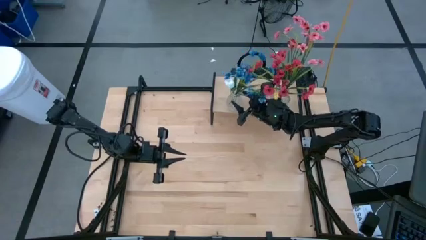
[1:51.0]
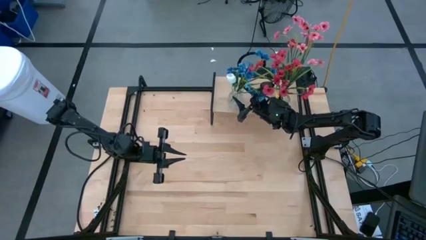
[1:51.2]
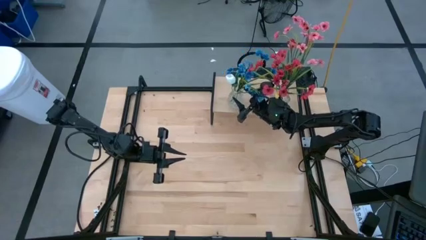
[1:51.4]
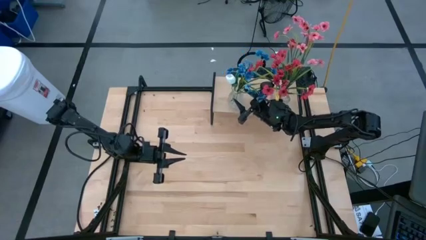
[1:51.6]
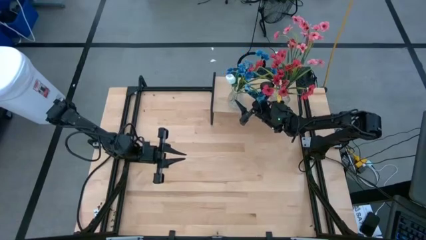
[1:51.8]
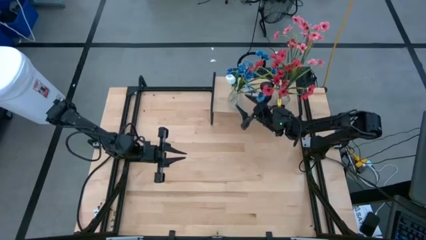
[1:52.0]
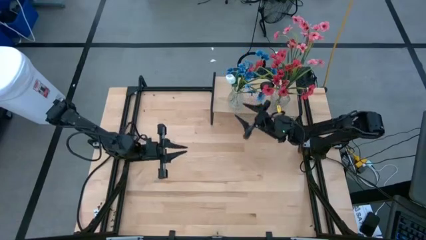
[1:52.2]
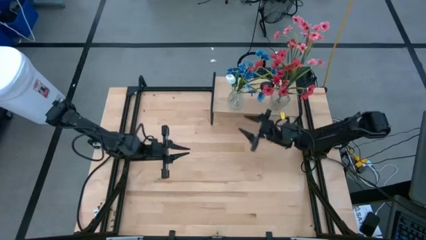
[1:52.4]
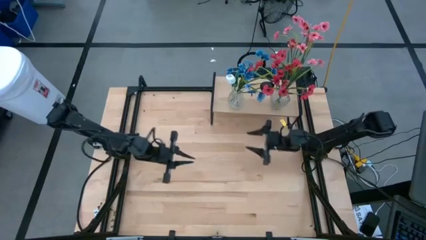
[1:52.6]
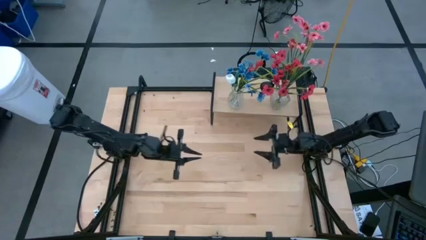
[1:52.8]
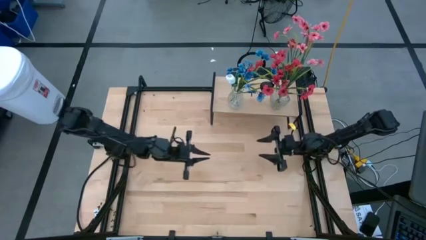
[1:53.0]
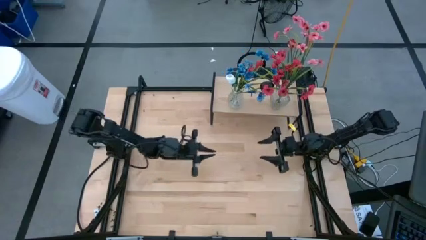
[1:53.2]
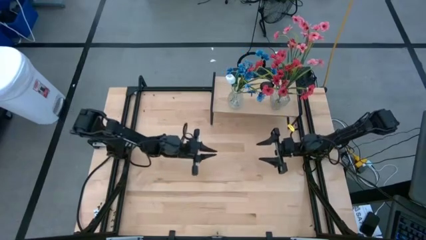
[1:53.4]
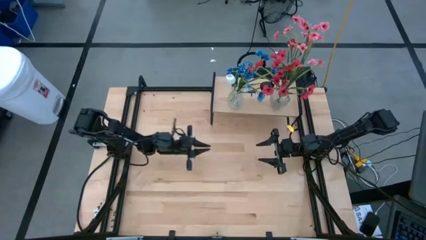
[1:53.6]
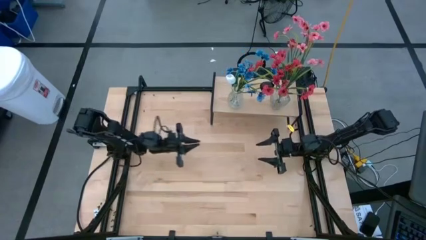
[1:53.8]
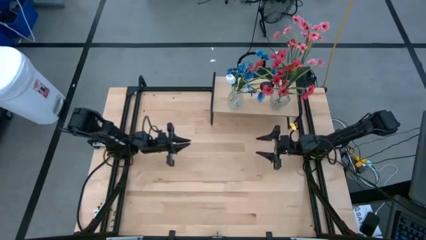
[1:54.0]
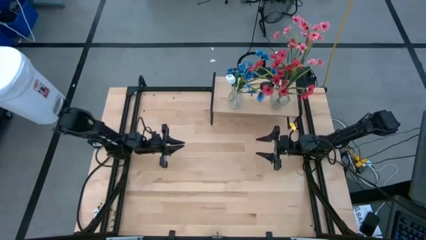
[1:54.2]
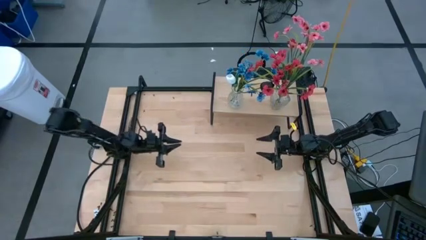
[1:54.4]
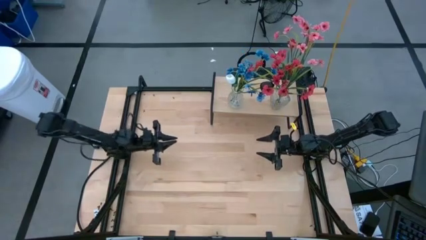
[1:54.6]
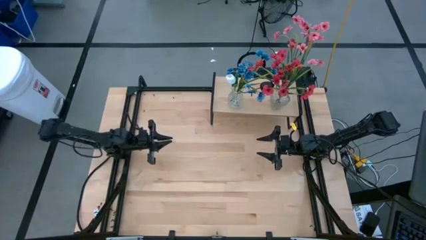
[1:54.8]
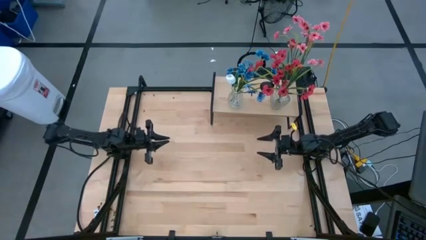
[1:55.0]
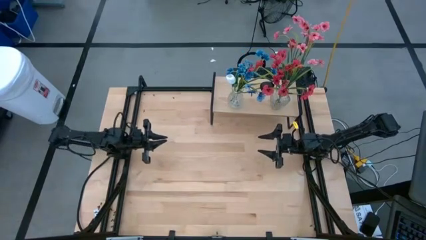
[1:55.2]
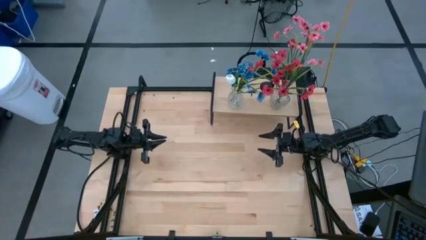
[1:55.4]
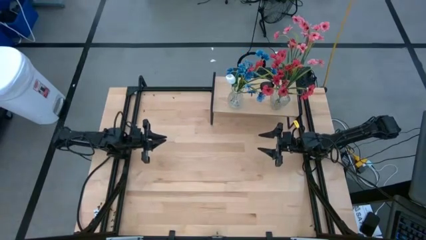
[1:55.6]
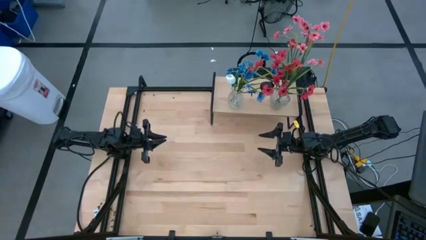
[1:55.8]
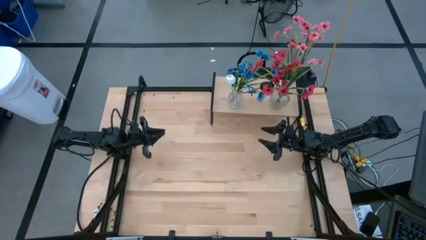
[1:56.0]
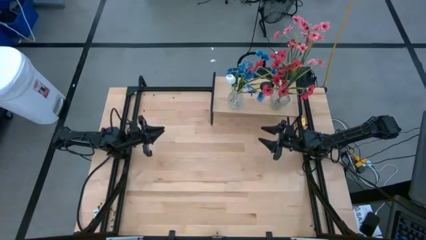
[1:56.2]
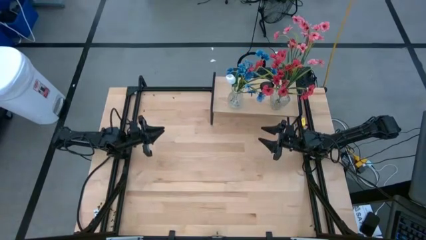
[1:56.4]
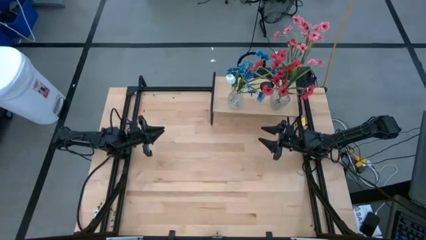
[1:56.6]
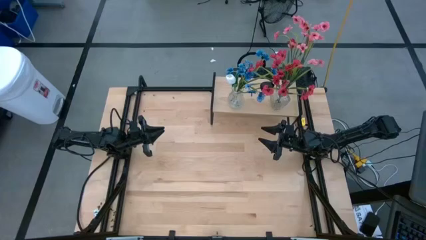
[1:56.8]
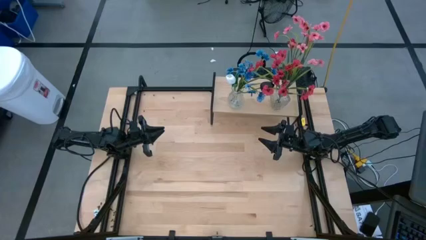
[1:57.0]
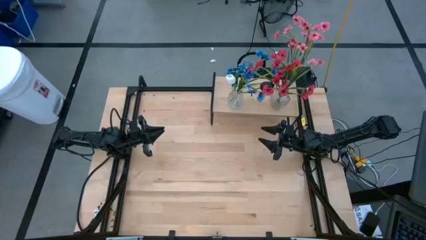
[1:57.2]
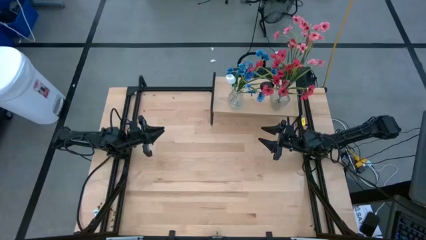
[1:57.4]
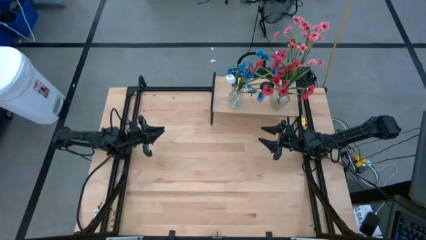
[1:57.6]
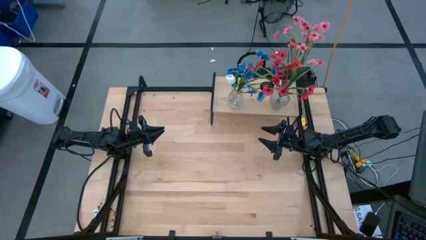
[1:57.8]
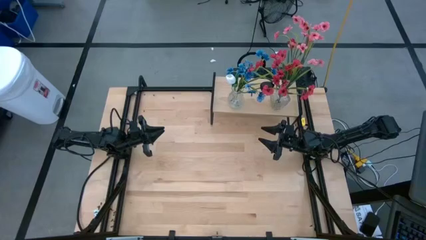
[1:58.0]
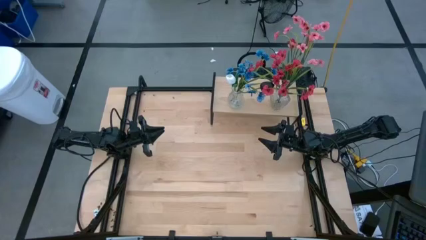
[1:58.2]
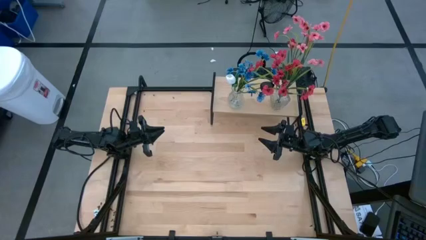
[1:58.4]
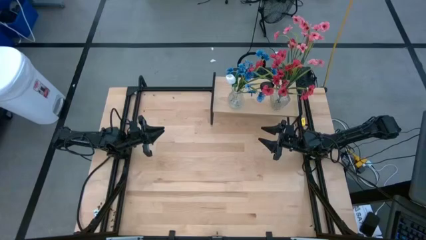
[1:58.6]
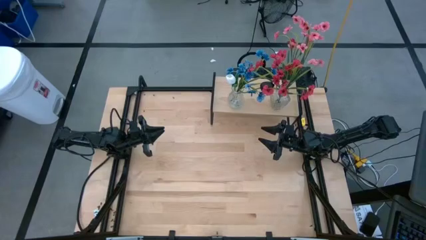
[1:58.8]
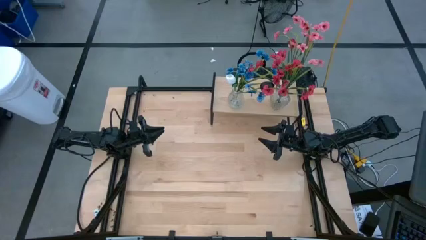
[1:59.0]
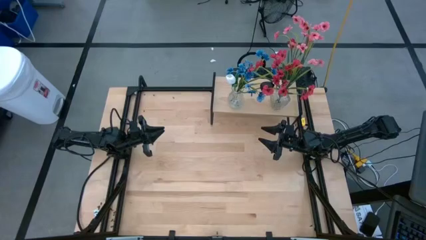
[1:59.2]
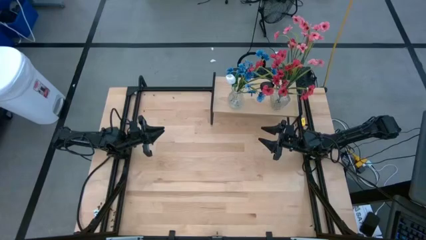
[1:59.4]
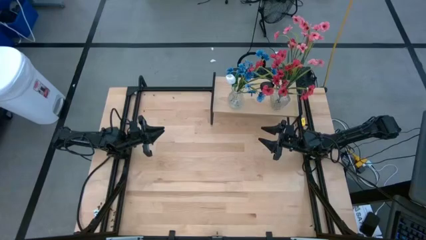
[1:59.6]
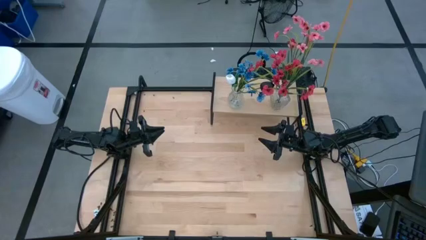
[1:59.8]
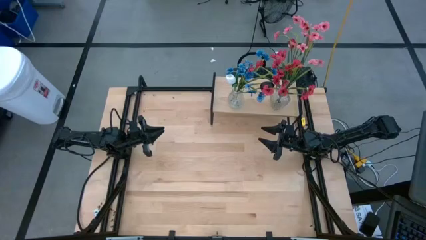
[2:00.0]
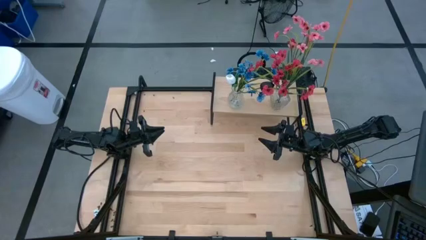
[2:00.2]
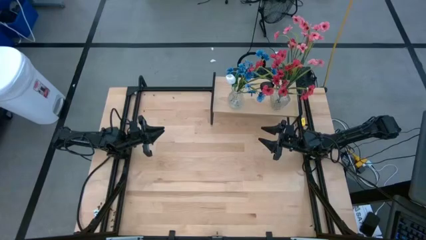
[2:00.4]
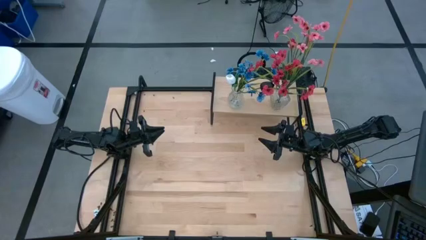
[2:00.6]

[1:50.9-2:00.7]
Task: Pick and place flowers into a vace then onto a shelf
Return to Home Position

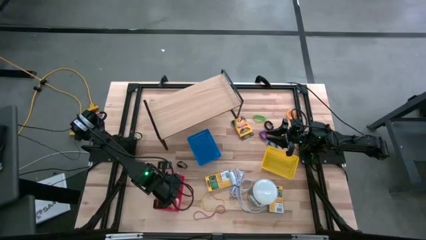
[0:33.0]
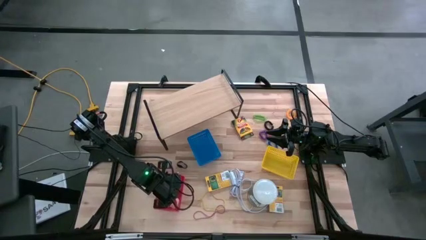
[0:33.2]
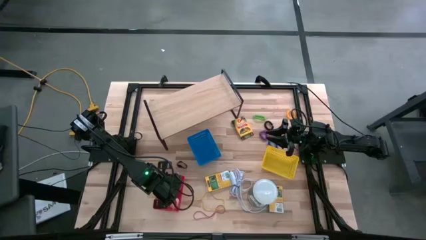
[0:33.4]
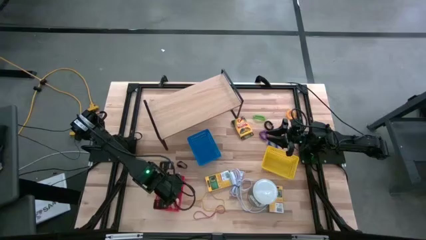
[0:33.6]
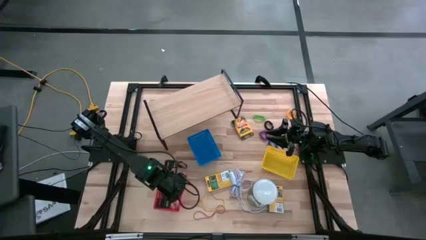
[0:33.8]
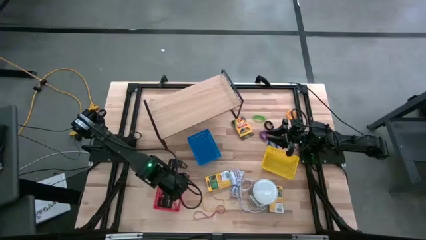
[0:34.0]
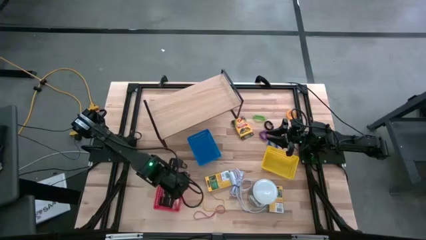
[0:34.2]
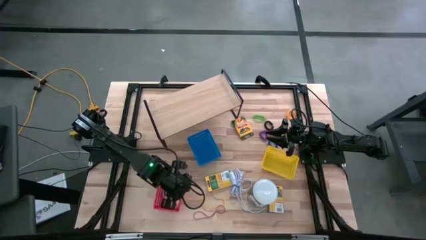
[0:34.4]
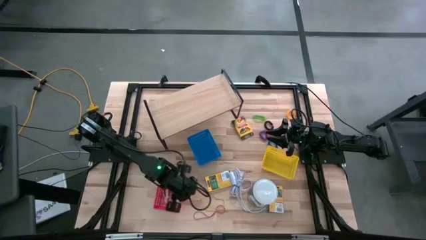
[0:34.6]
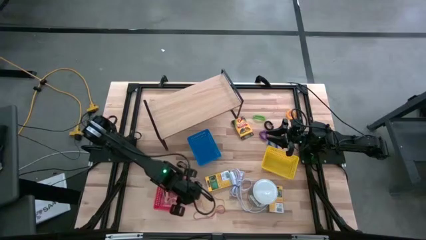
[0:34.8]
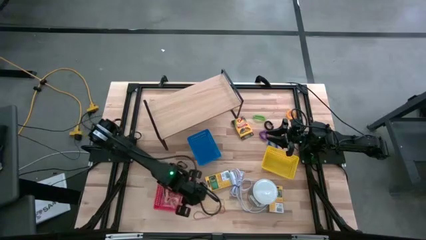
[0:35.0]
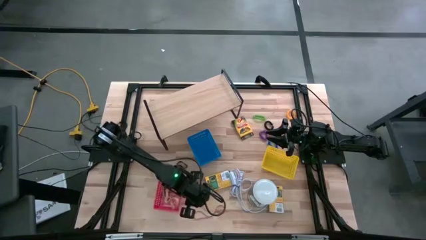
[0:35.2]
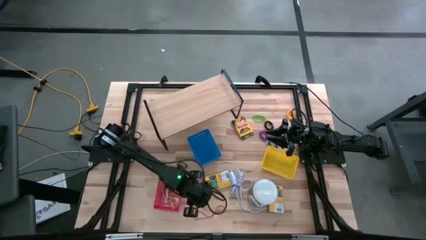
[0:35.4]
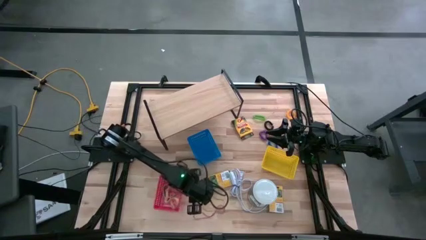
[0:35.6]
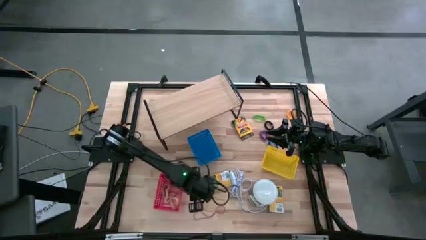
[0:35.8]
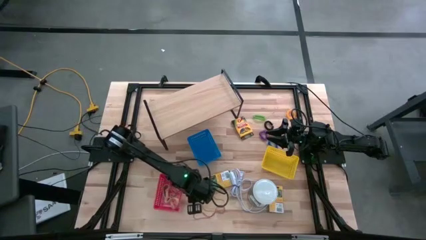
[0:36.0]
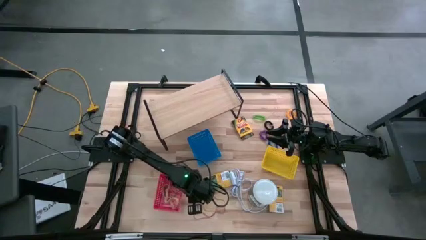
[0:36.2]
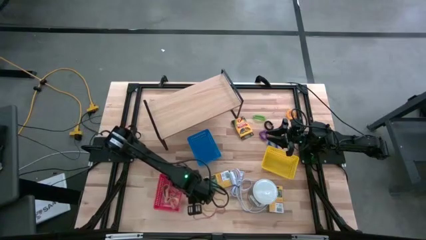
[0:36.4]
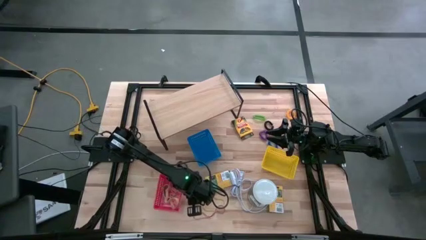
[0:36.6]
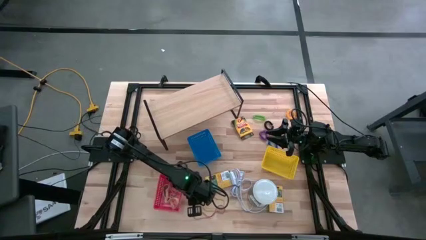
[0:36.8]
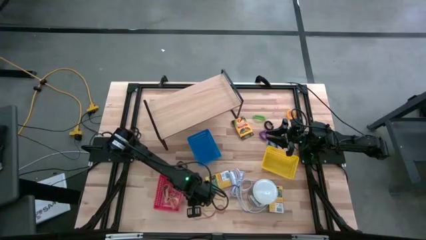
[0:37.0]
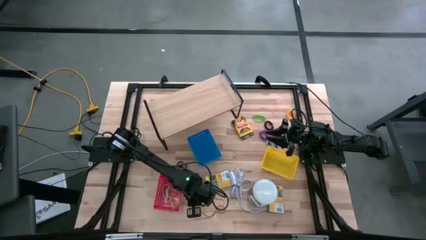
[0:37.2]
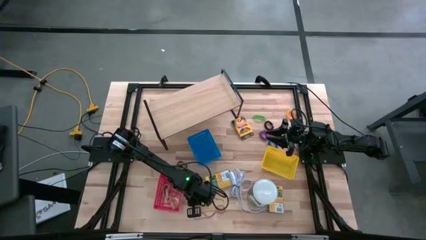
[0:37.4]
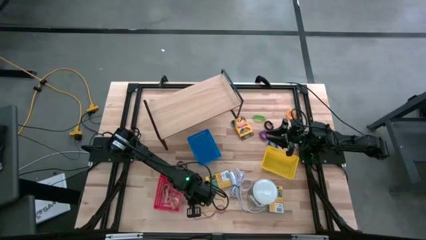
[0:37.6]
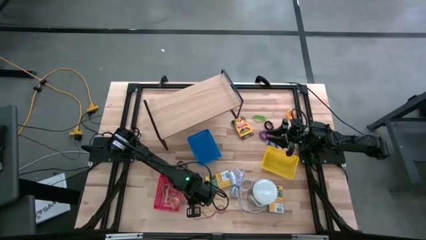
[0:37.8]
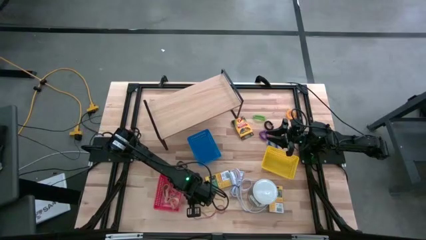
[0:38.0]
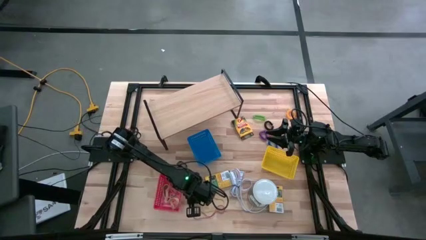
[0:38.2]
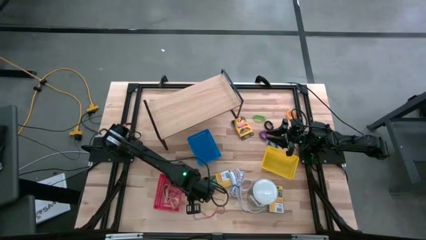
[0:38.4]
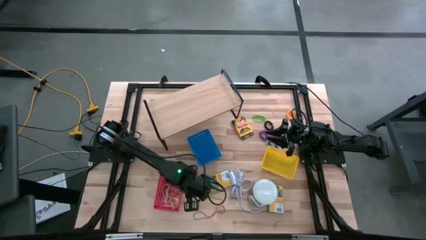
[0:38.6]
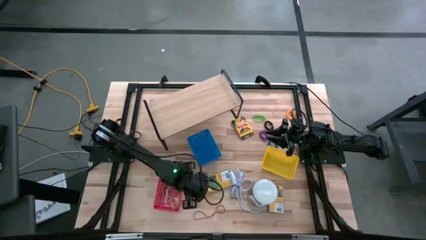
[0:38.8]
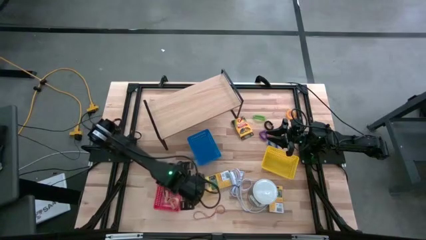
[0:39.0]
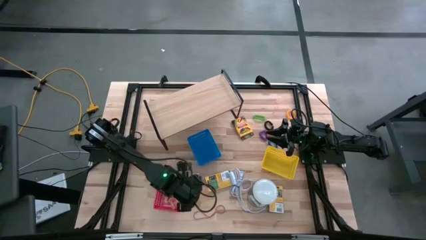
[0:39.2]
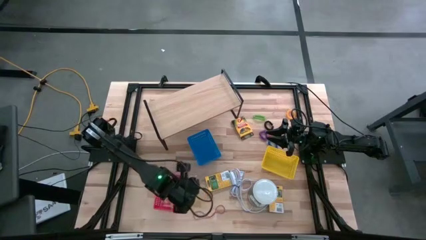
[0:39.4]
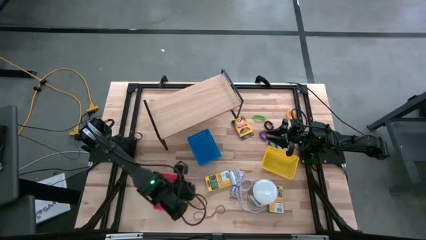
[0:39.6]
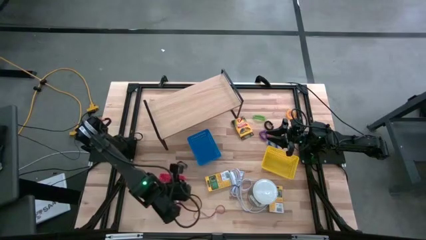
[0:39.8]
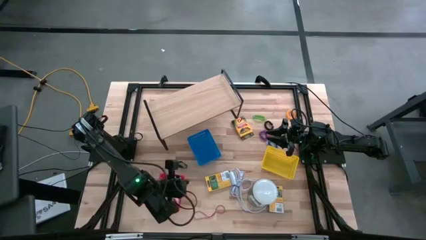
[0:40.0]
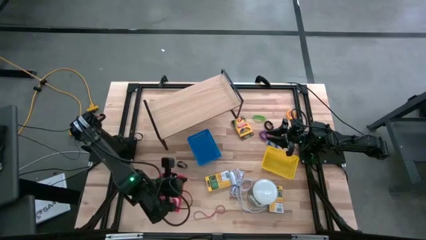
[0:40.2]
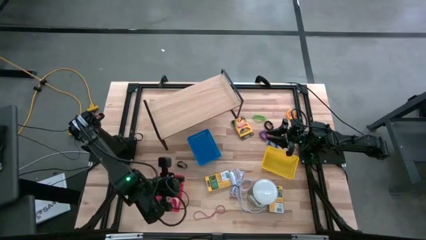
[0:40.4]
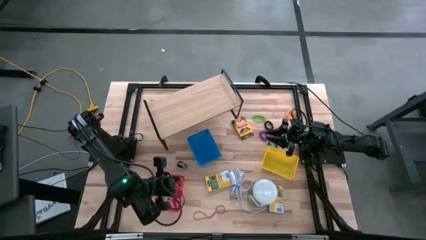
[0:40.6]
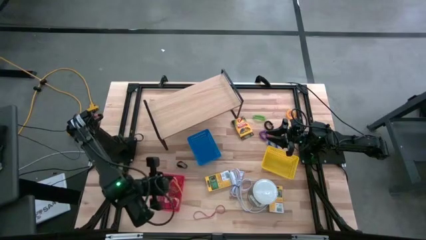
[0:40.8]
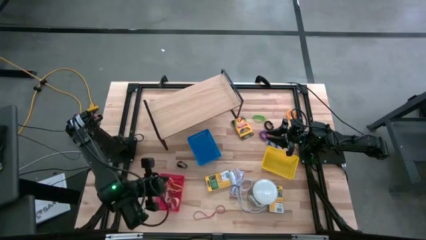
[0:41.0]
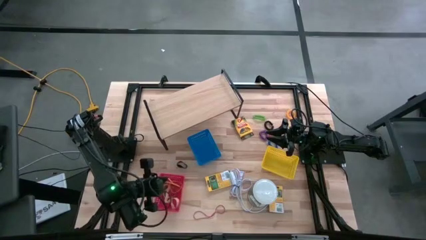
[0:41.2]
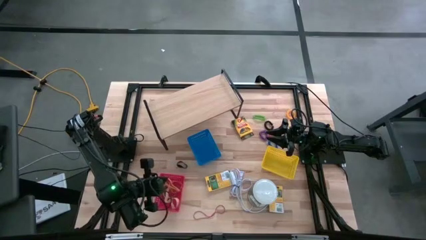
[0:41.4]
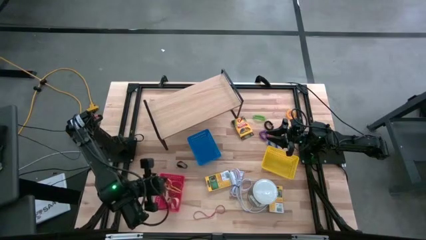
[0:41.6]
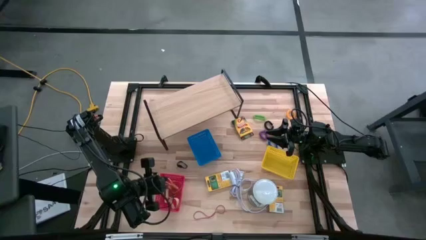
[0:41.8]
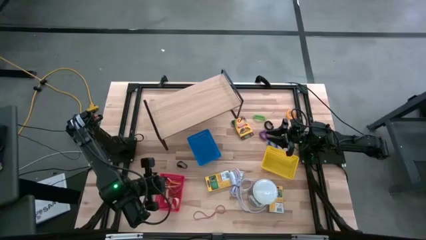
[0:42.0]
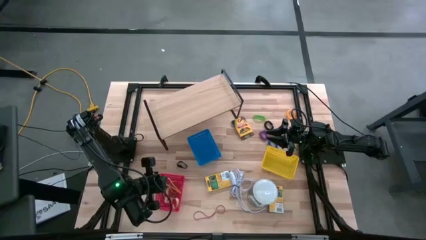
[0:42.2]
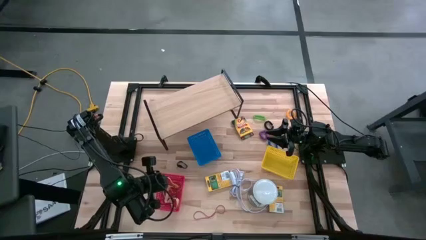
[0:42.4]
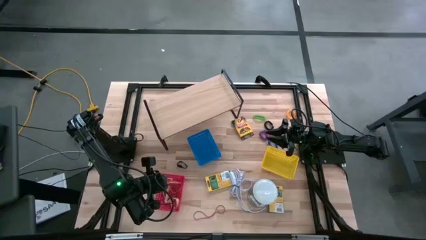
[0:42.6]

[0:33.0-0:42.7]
Task: Pick & Place Office Desk Supplies
Put the yellow rubber band into the red bin
